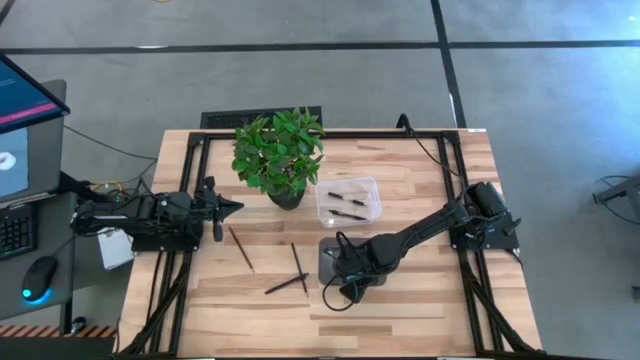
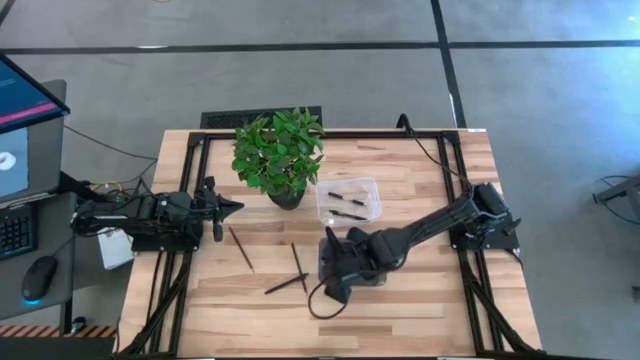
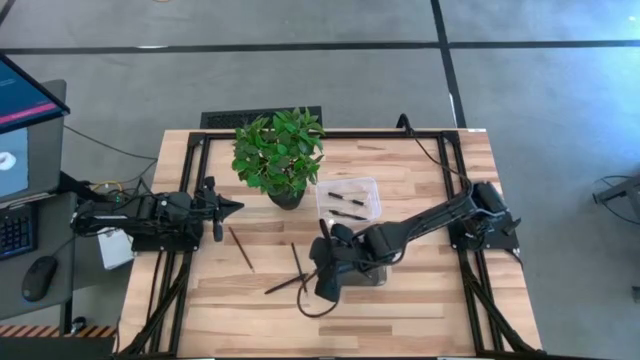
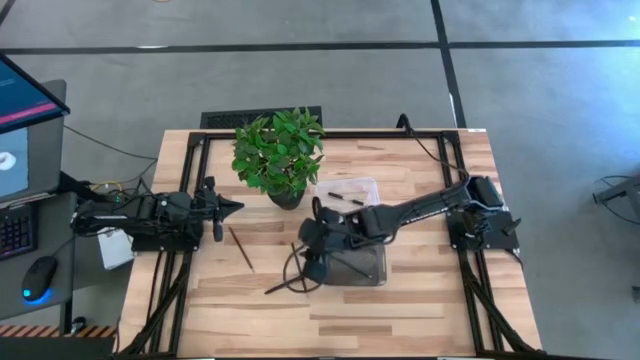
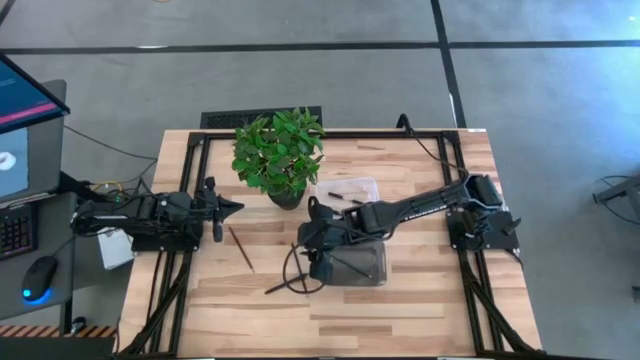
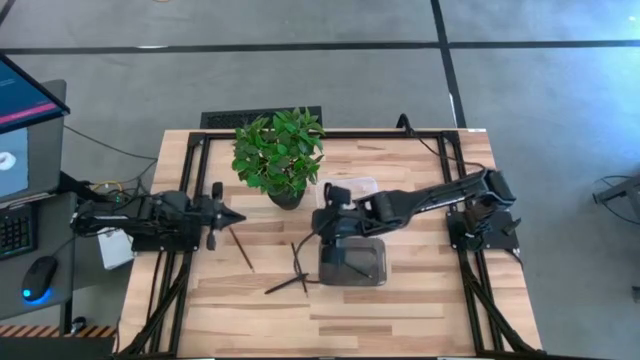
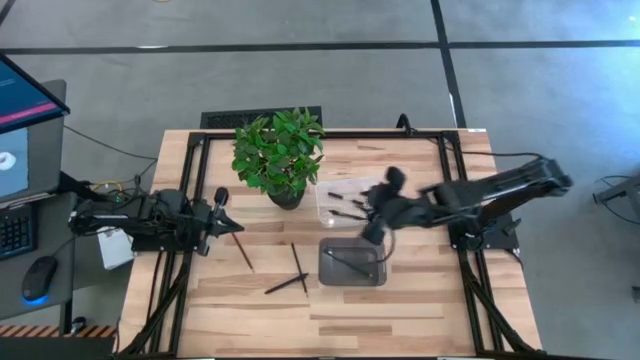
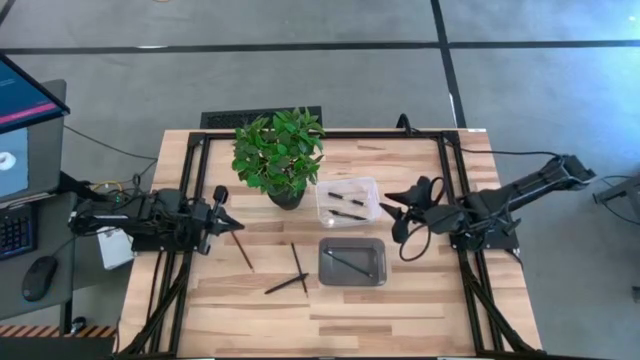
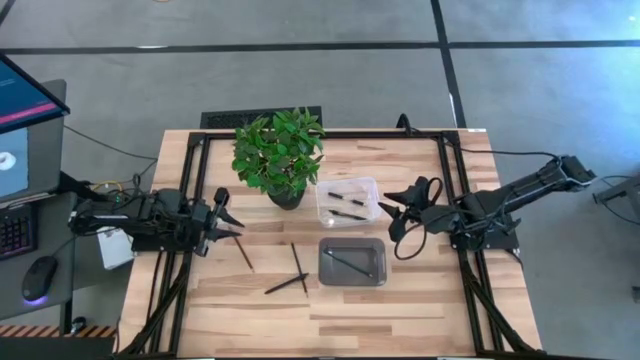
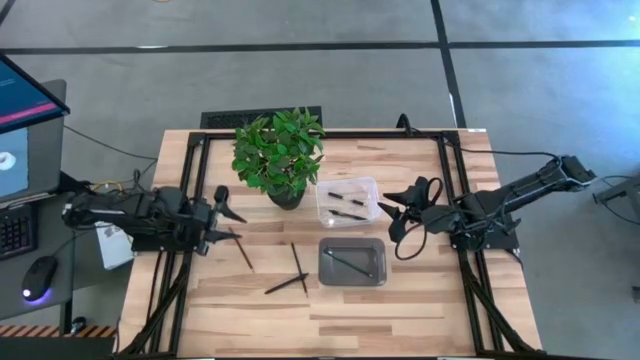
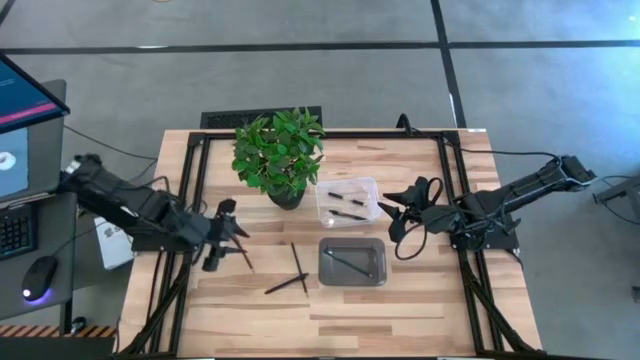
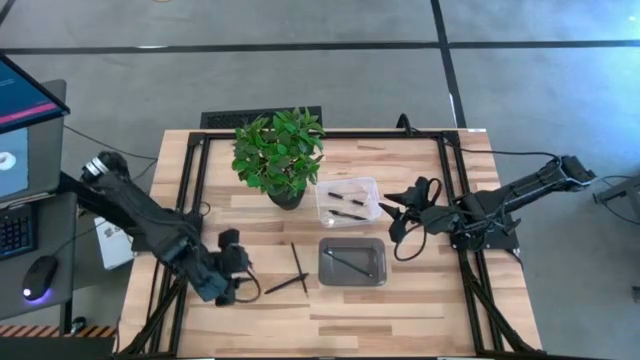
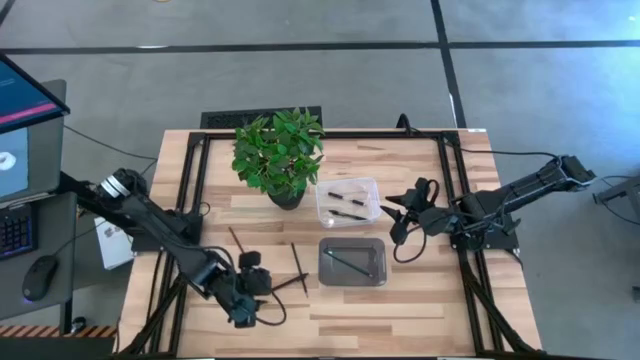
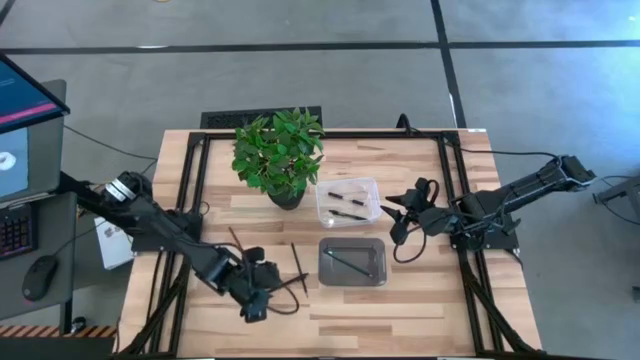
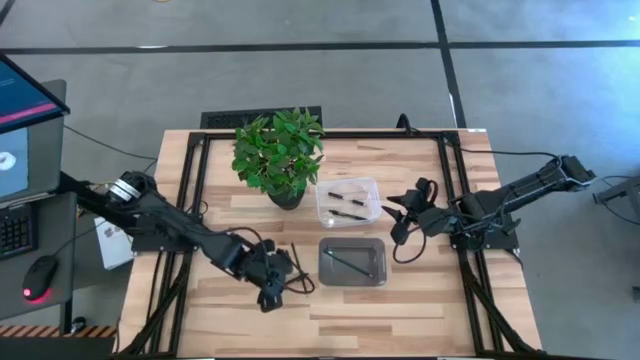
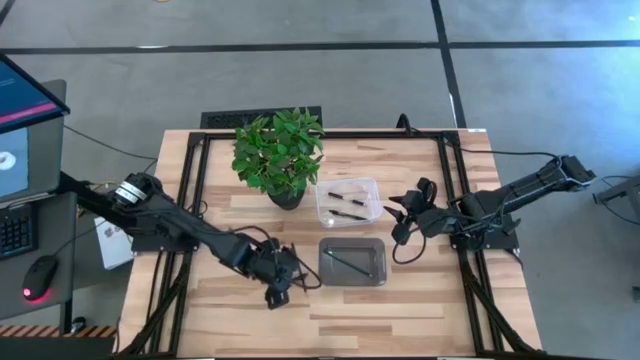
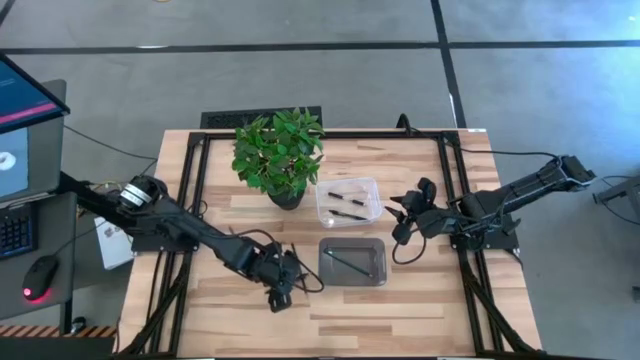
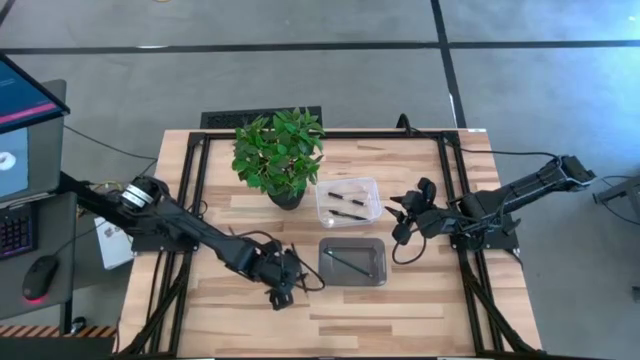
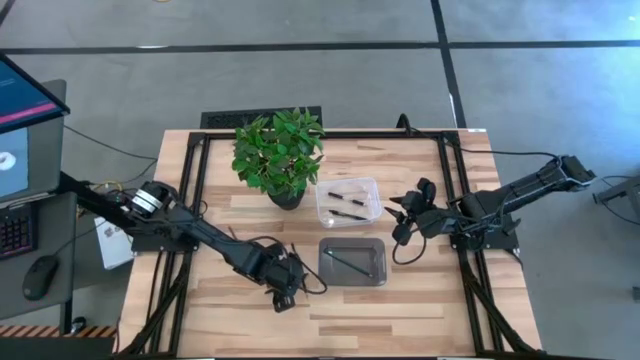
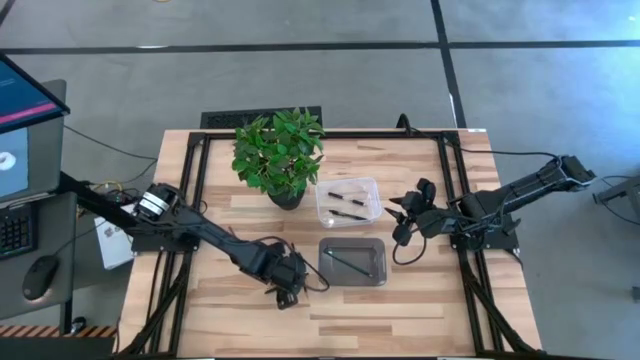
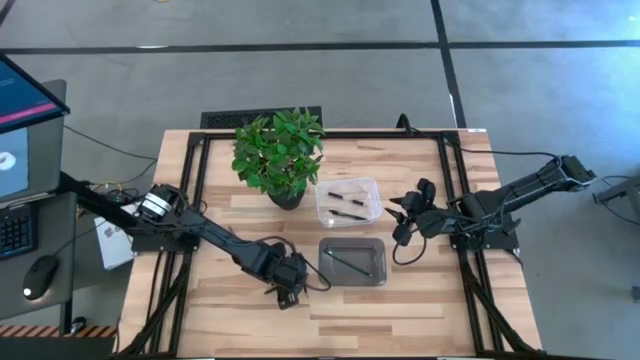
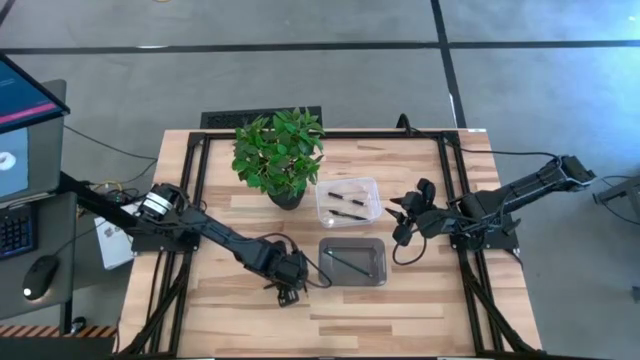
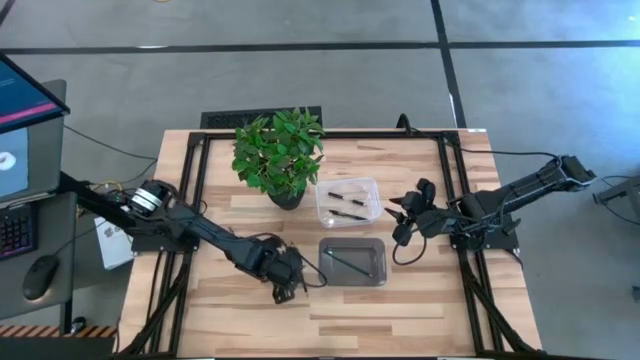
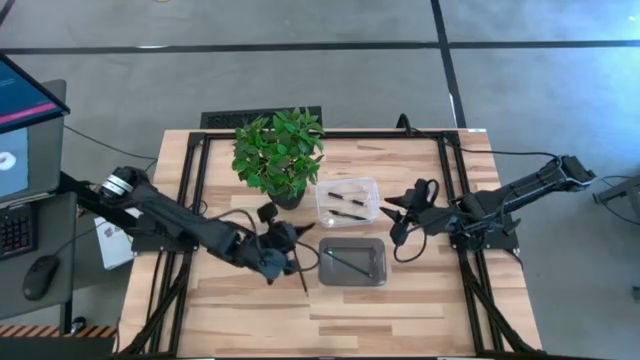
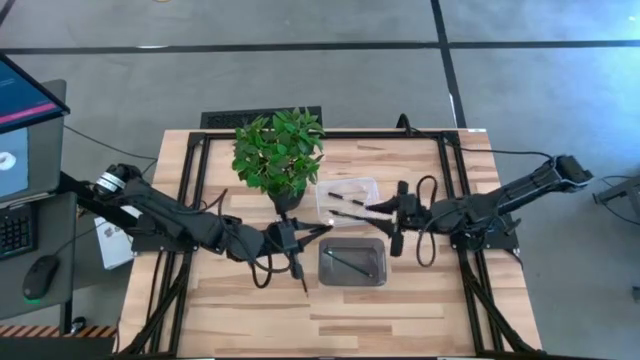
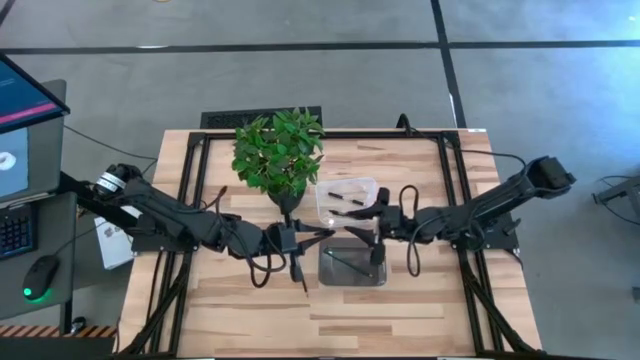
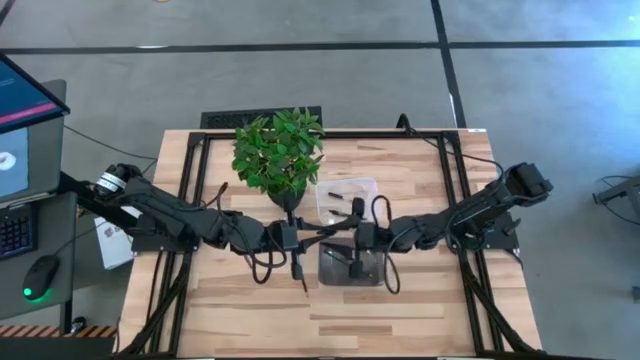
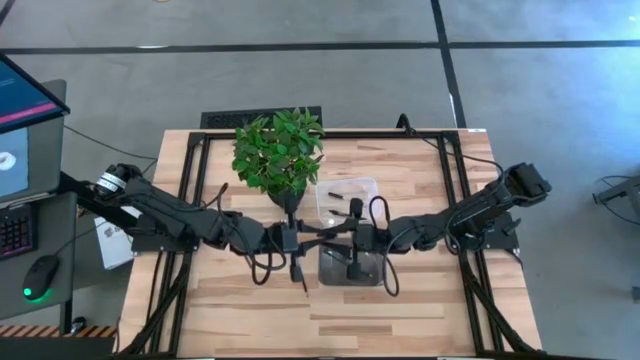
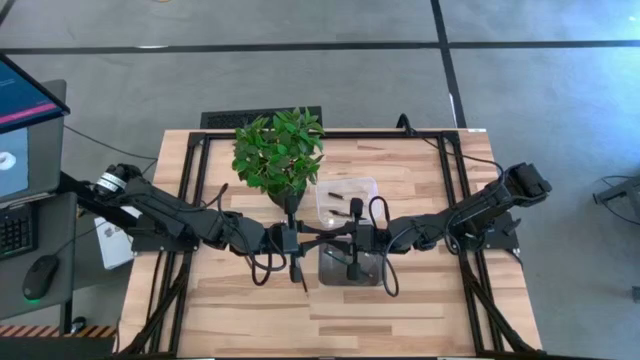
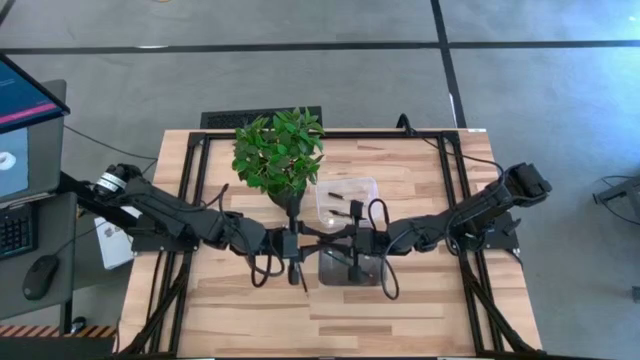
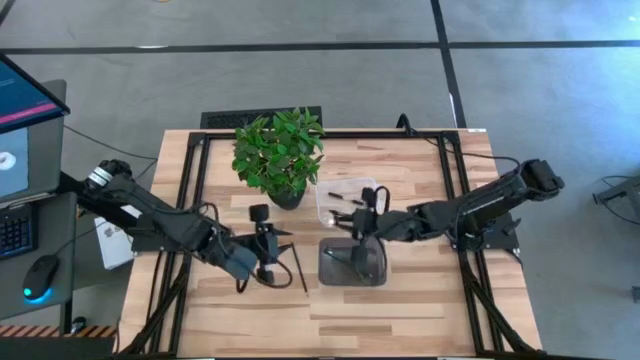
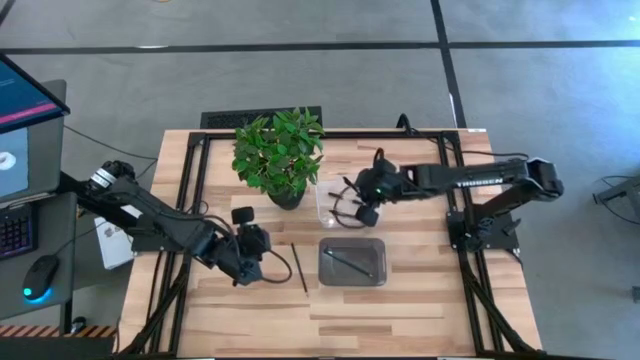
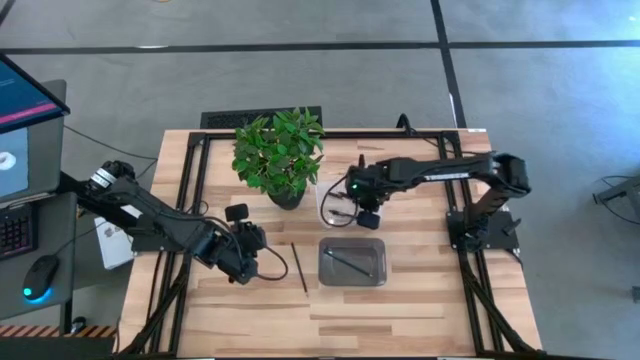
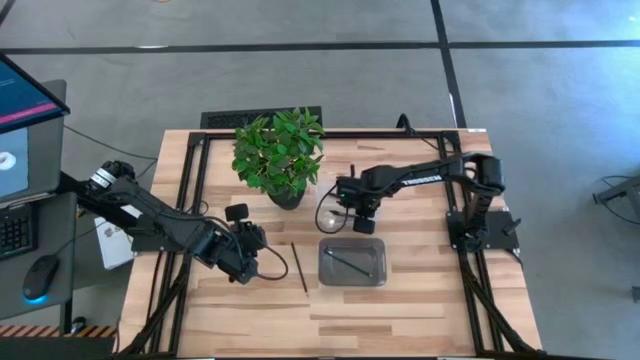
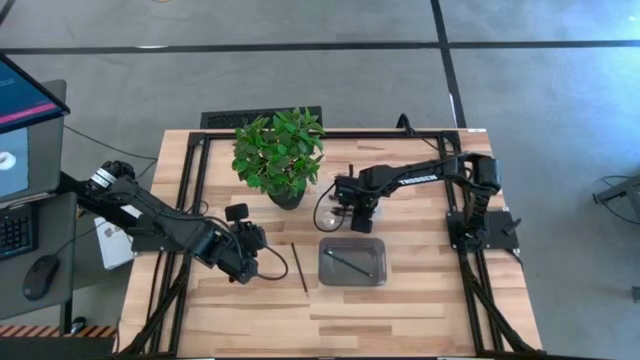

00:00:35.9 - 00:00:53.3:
Task: Sort pens & pencils
Put the black pen into the transparent bin

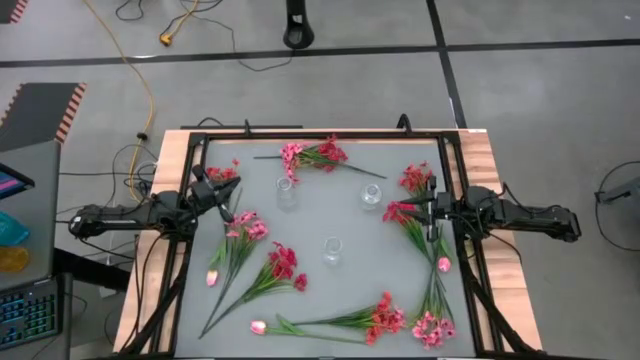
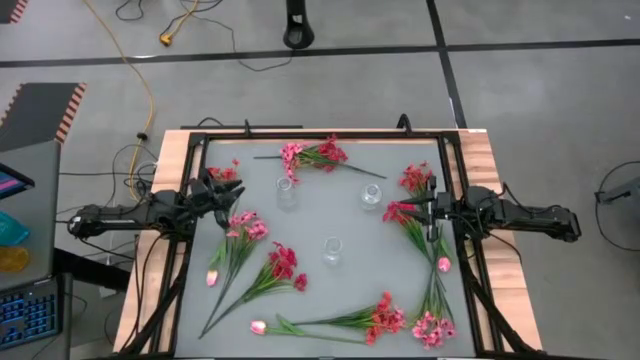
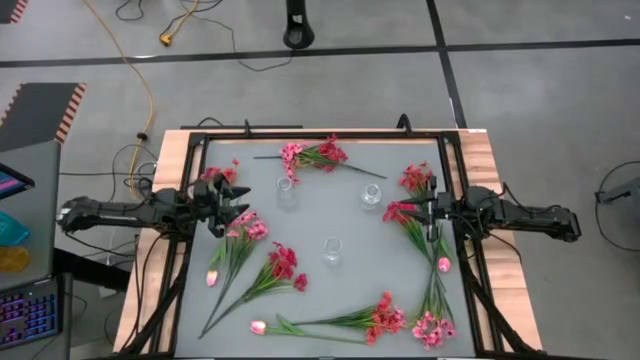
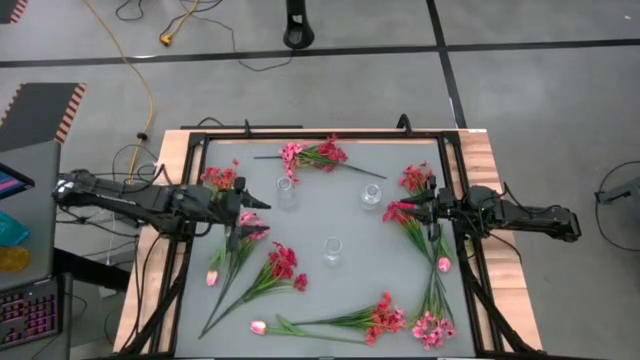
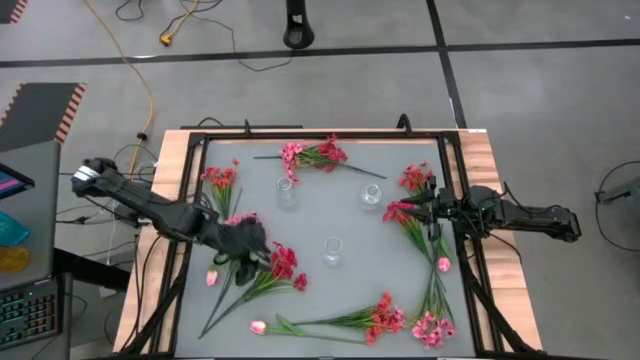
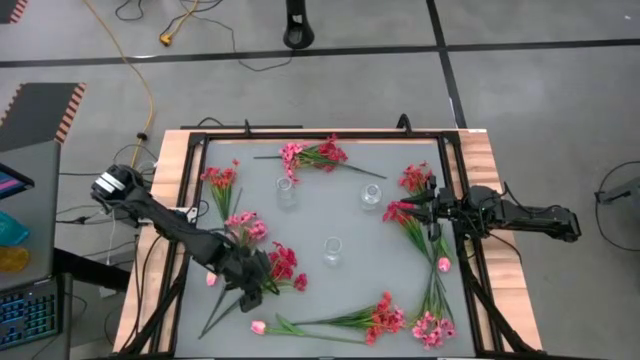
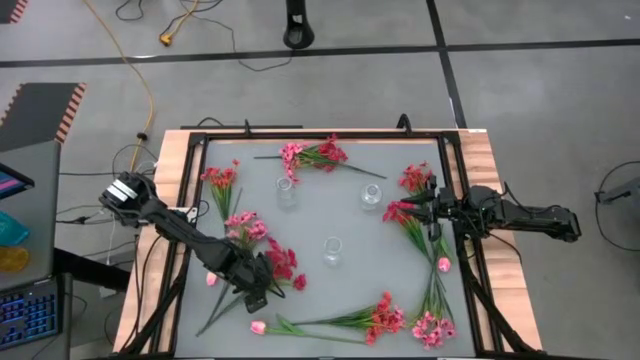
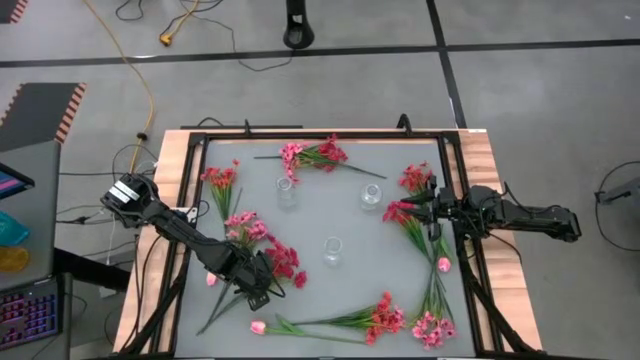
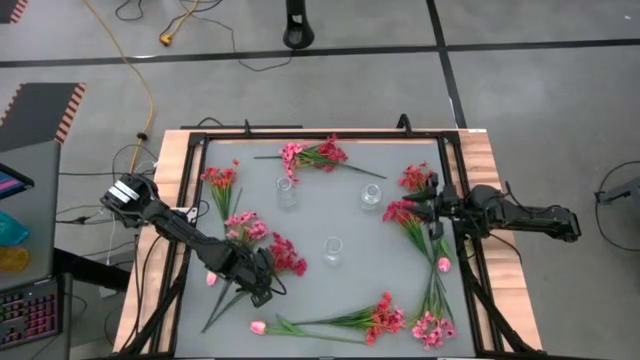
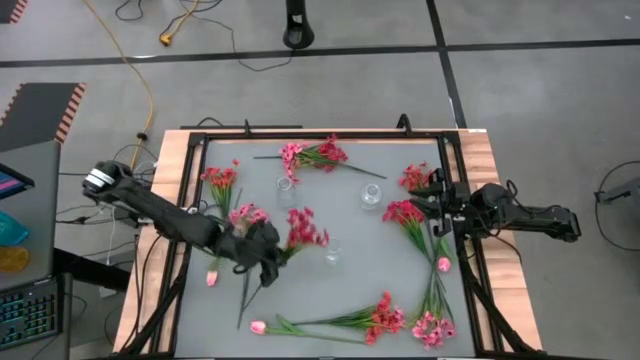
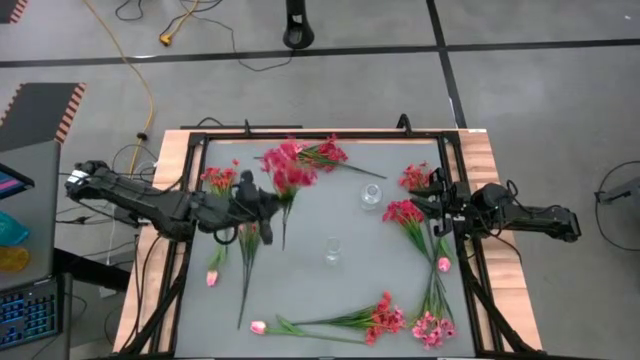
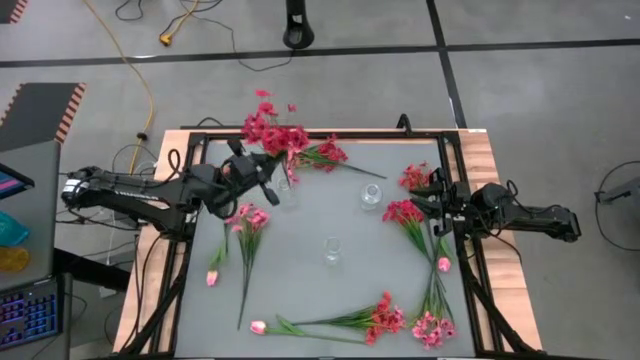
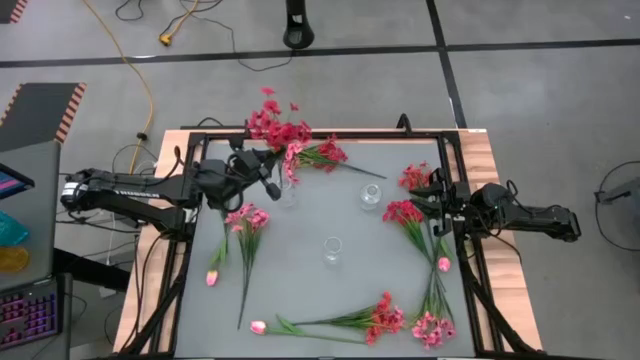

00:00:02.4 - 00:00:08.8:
Task: Sort flowers into vase by color
Put the middle left red flowers into the left transparent vase
